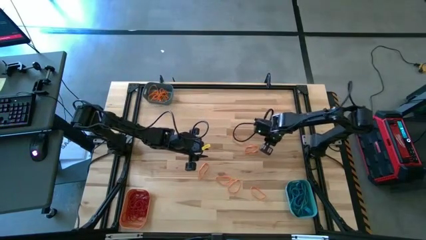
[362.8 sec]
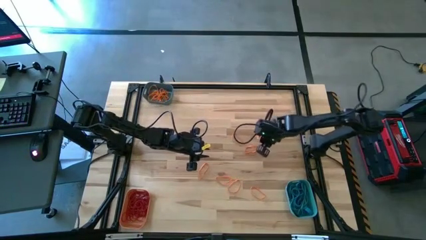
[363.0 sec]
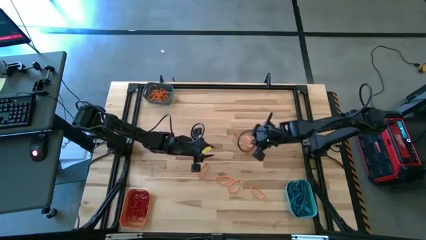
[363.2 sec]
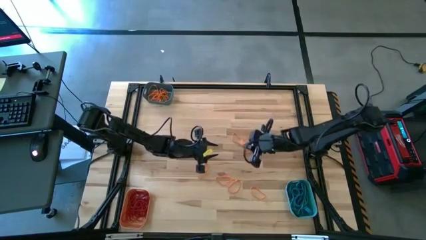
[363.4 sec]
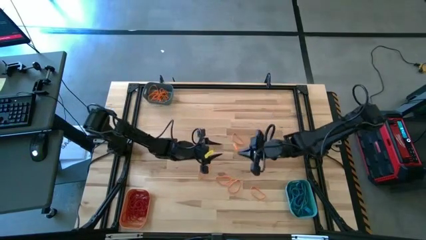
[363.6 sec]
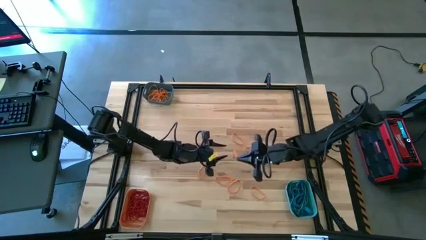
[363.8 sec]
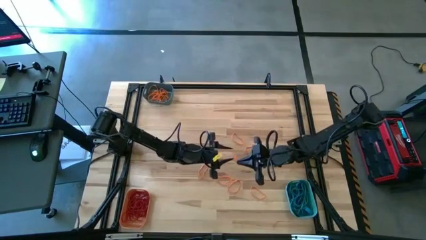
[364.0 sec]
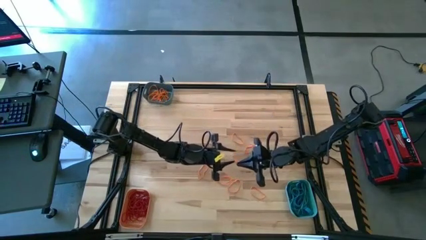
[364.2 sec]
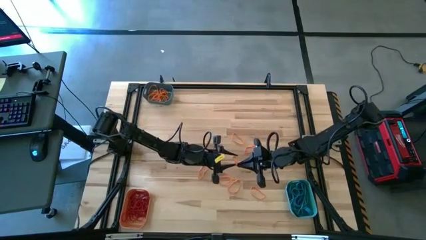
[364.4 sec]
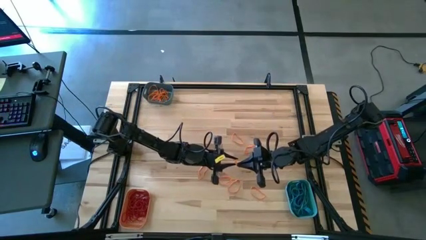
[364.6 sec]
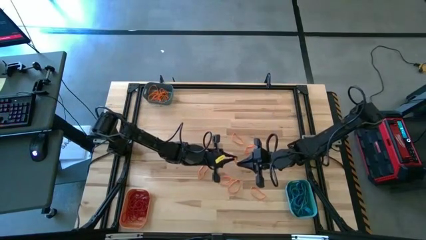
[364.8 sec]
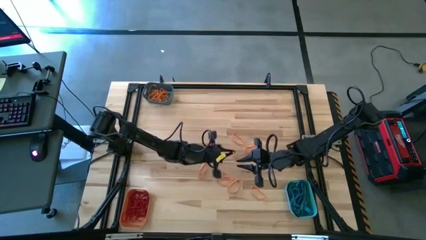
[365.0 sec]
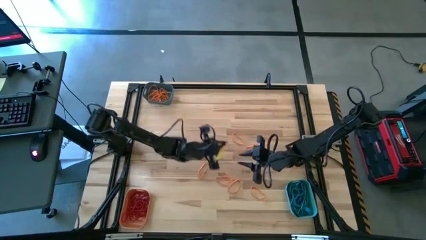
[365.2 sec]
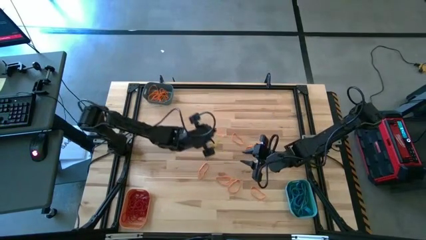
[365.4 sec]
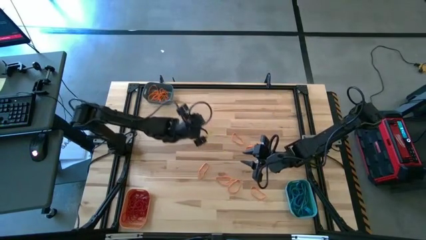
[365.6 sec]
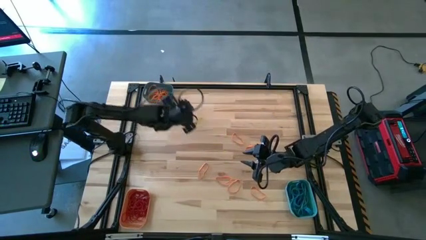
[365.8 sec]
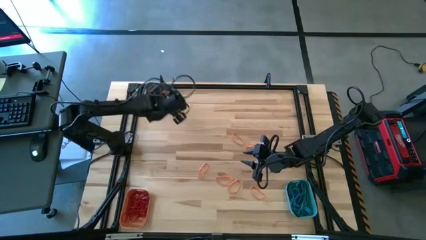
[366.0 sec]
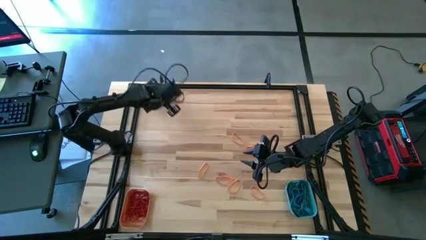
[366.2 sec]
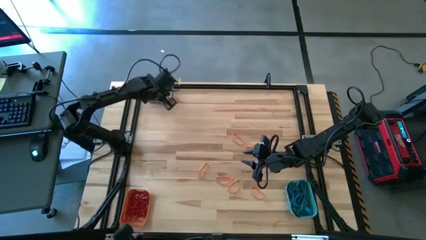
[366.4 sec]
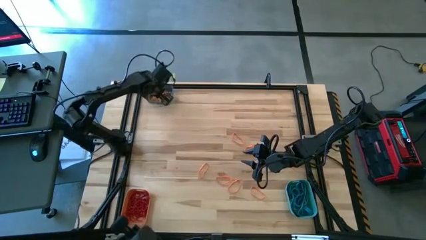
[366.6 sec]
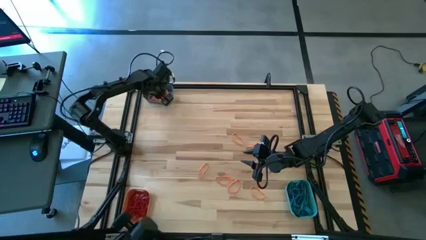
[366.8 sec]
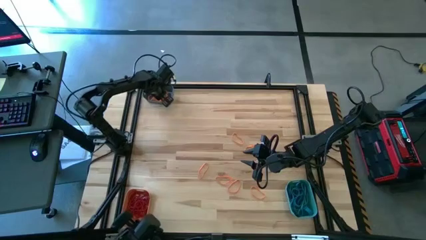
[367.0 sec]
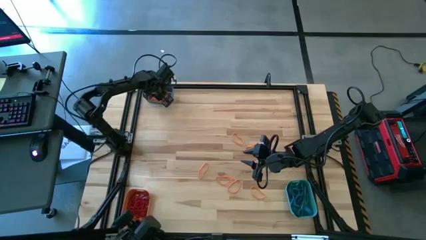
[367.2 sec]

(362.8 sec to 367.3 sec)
Task: Sort rubber bands into baskets
Put the orange rubber band into the blue bin

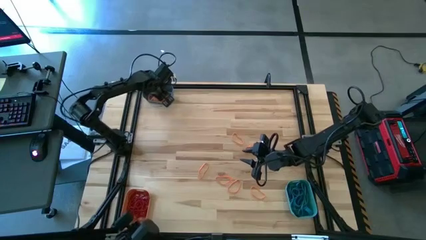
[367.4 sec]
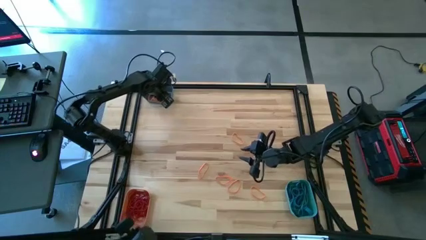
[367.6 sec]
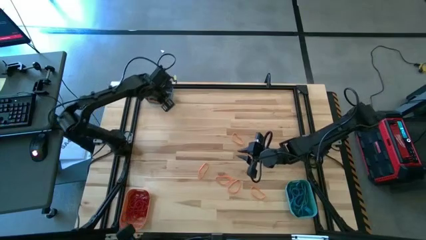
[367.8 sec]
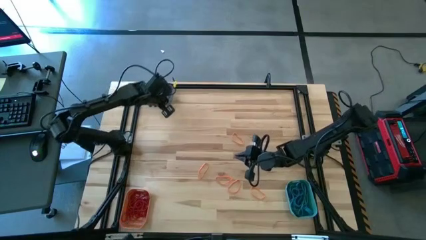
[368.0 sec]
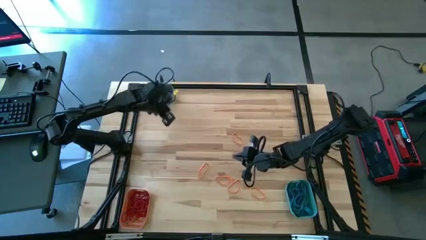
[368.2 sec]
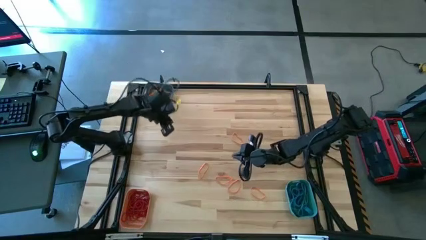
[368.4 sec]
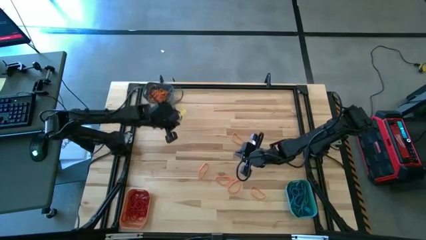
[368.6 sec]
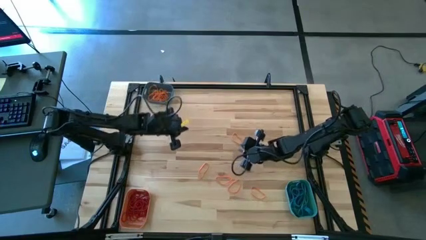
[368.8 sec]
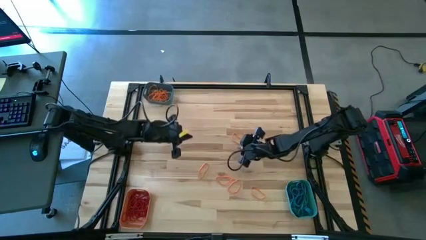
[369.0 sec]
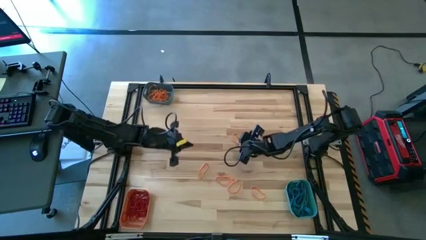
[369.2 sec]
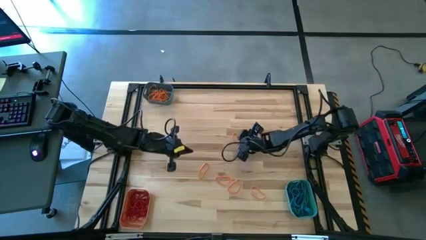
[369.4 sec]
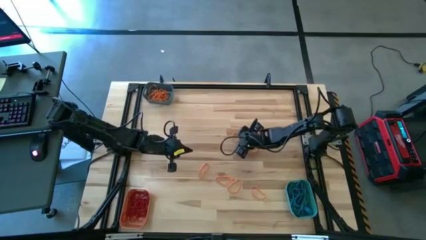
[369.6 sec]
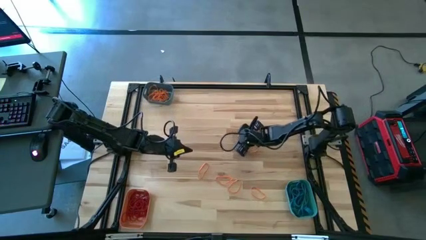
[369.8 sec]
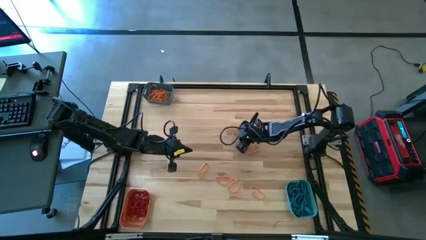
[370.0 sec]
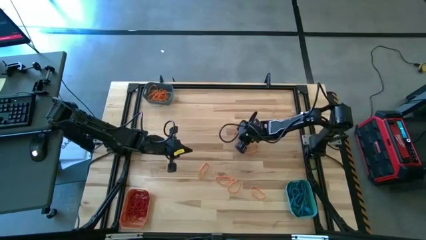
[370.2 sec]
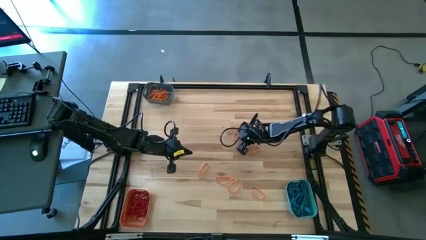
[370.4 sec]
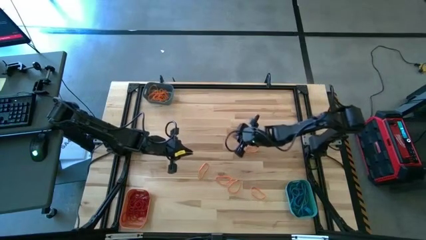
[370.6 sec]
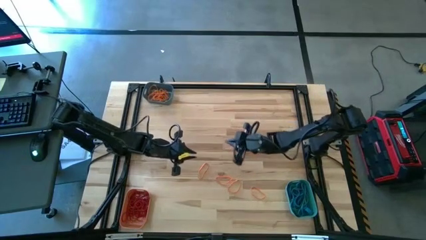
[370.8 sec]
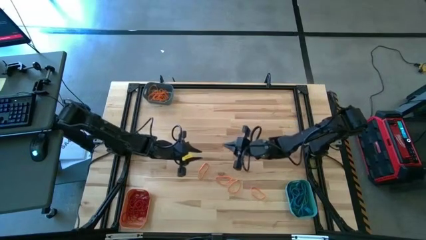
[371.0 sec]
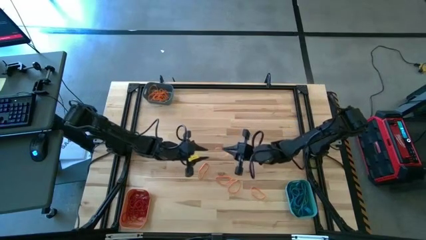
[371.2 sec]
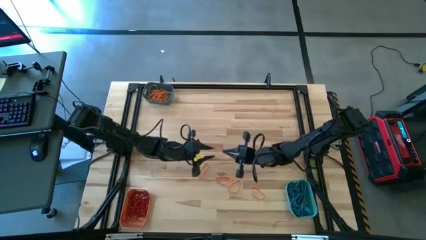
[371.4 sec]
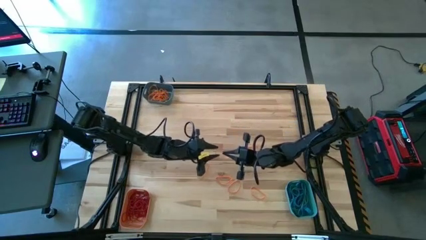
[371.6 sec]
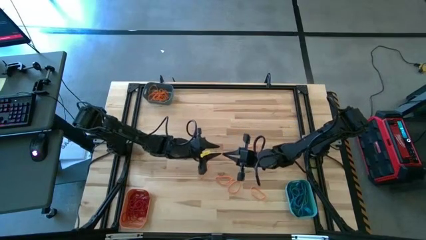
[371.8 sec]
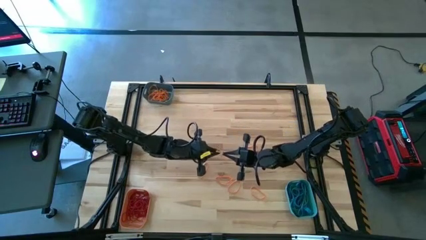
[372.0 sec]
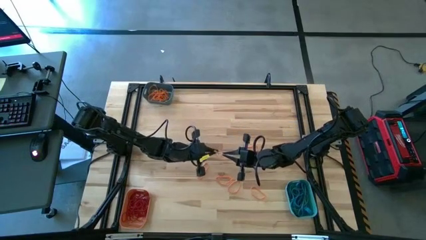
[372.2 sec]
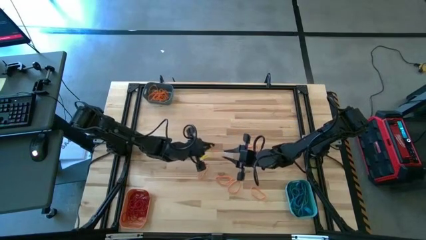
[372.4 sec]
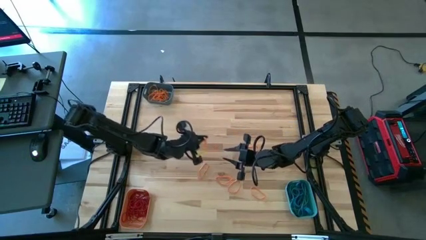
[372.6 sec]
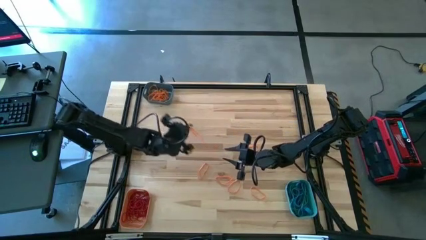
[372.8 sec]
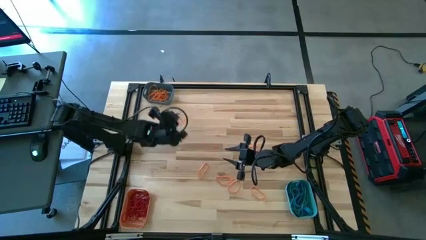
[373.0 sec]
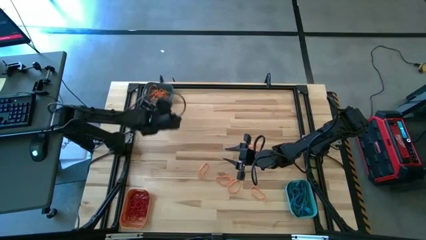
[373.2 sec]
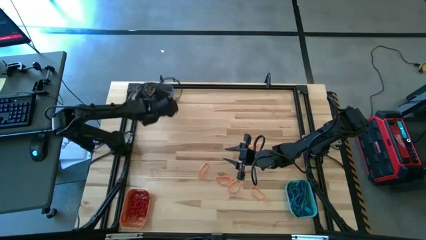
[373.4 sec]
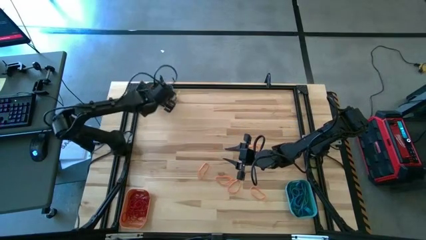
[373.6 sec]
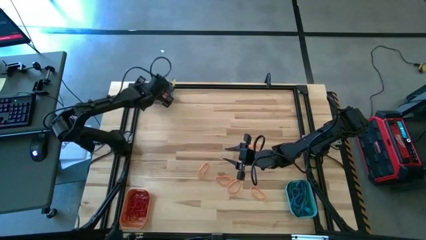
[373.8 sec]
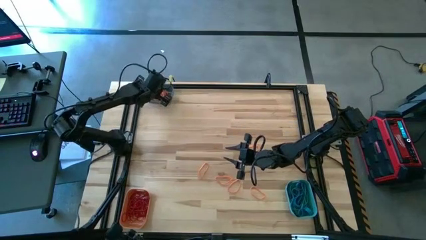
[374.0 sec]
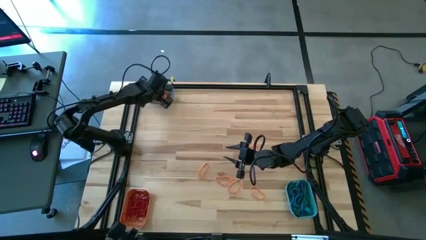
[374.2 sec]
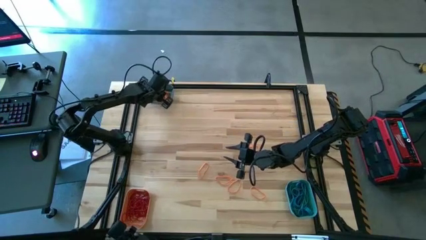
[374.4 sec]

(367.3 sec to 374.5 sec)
Put the orange rubber band into the blue bin

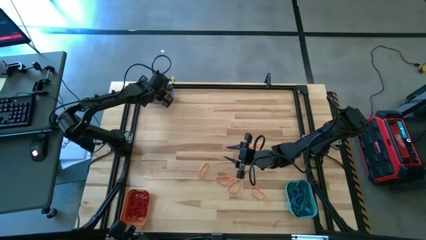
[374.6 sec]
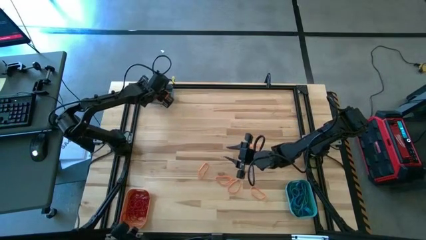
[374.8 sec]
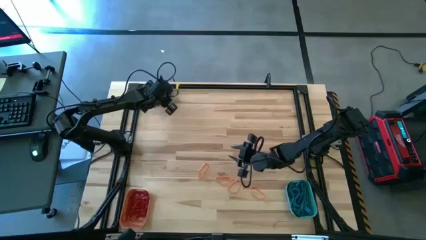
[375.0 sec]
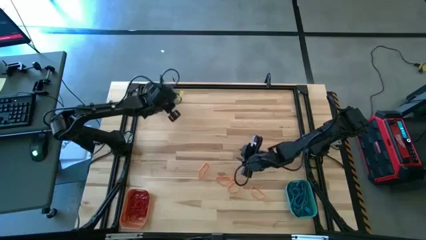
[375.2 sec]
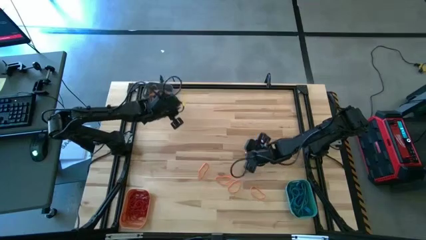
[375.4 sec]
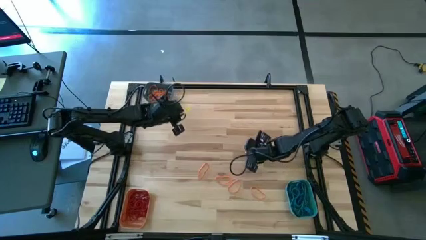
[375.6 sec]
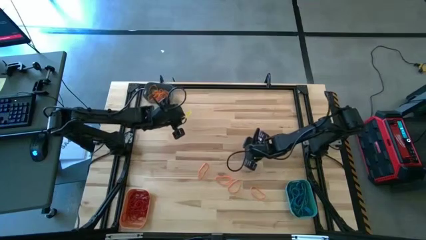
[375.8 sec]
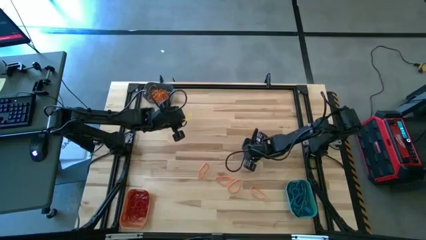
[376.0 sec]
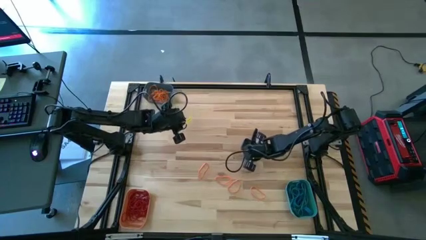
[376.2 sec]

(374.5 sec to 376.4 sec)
Put the orange rubber band into the blue bin

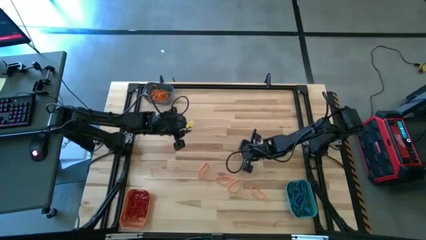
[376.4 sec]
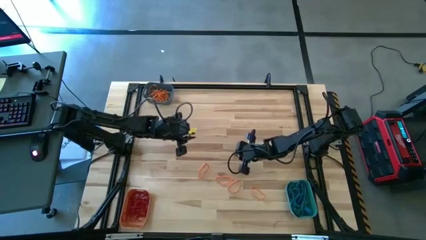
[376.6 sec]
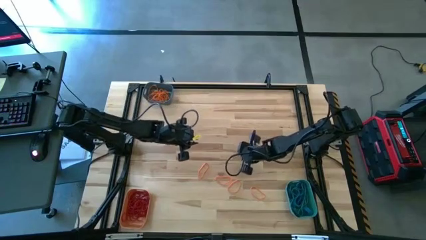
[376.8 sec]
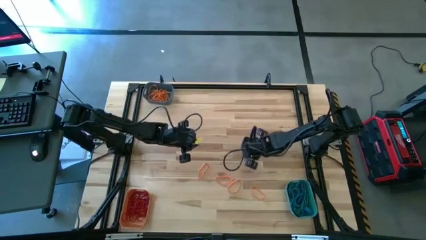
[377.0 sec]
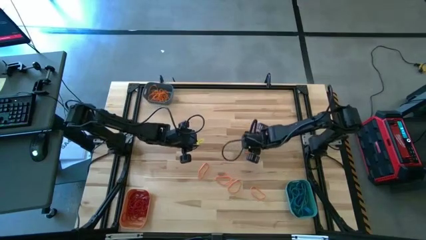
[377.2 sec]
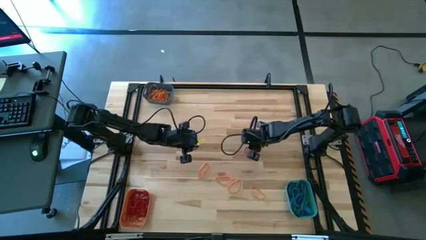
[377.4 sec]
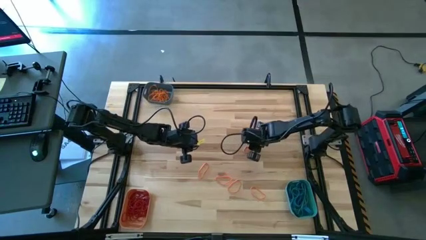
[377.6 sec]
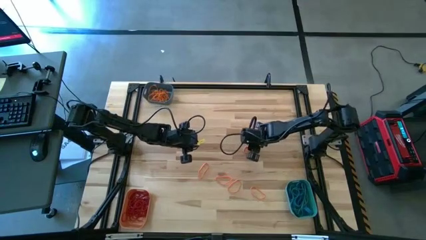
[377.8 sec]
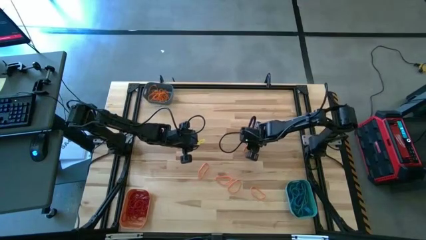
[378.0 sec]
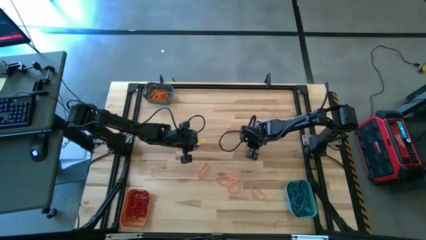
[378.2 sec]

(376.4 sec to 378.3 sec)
Put the orange rubber band into the blue bin
